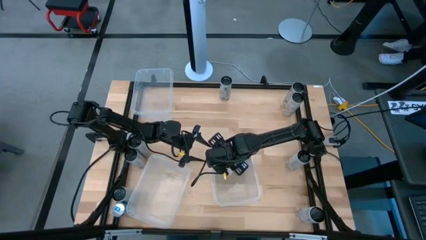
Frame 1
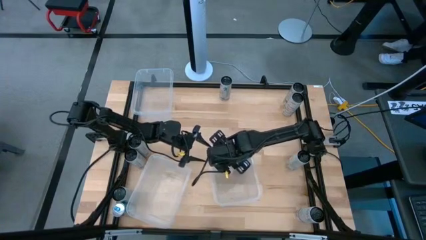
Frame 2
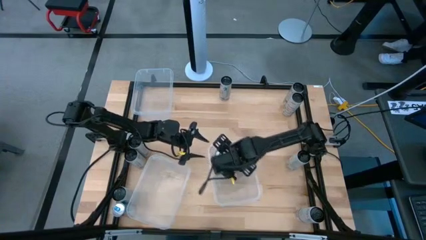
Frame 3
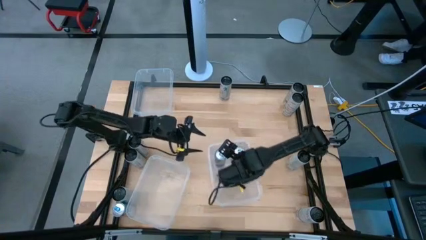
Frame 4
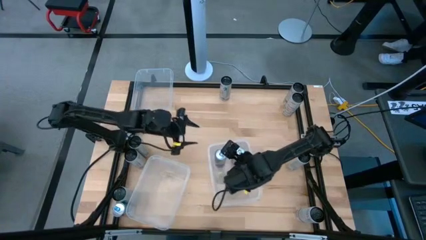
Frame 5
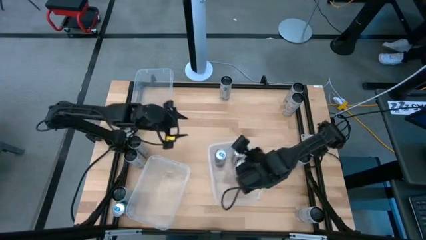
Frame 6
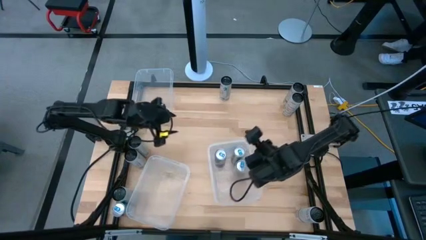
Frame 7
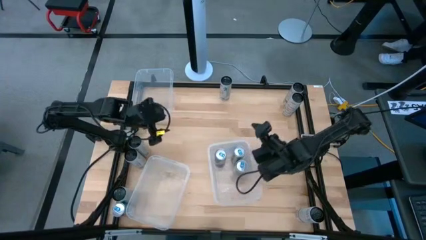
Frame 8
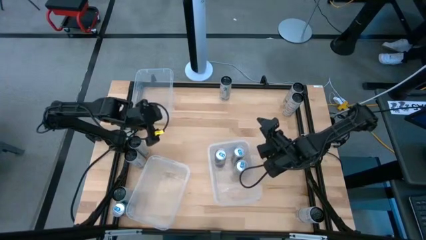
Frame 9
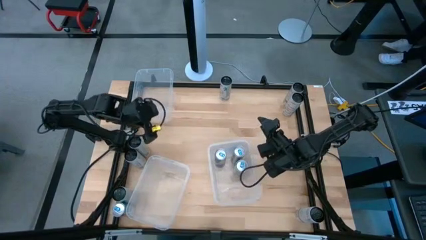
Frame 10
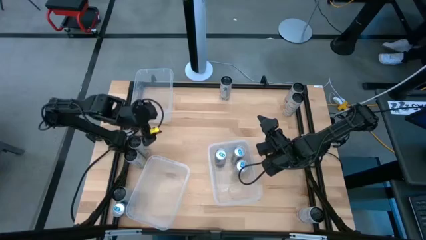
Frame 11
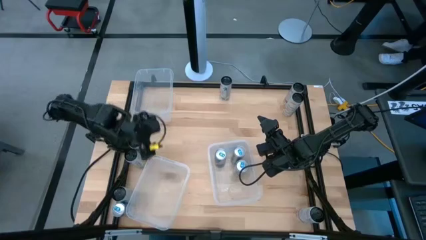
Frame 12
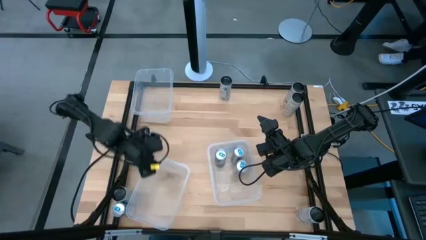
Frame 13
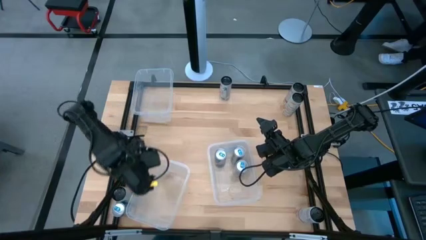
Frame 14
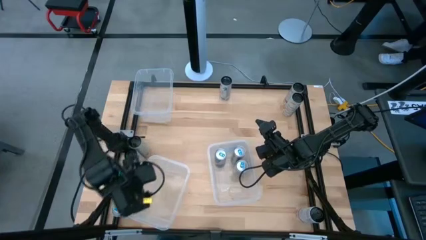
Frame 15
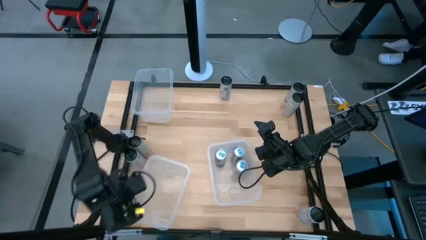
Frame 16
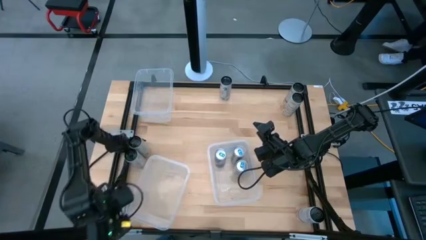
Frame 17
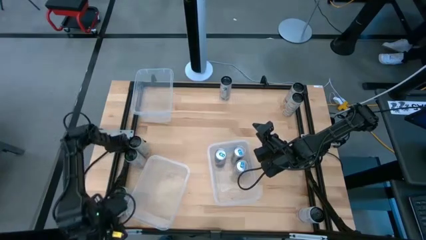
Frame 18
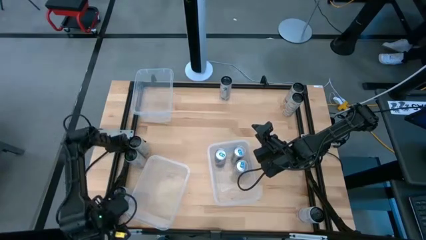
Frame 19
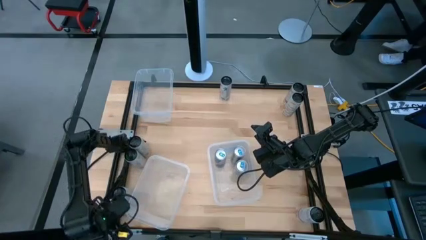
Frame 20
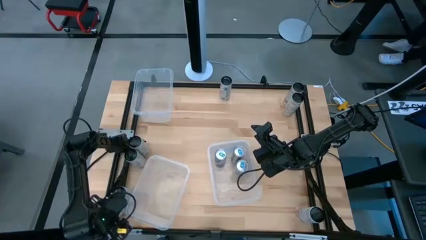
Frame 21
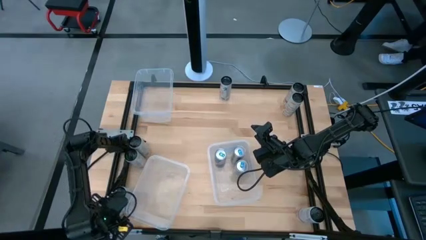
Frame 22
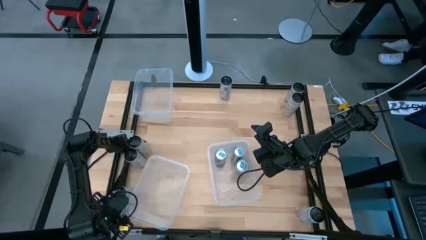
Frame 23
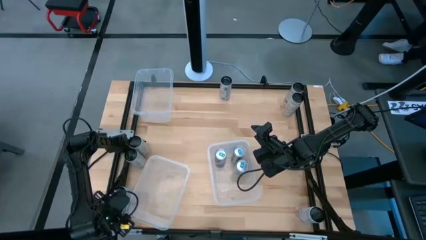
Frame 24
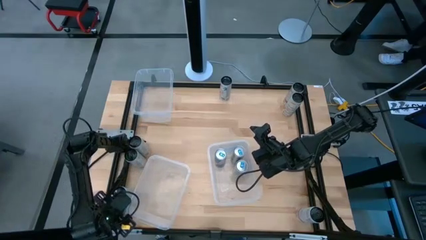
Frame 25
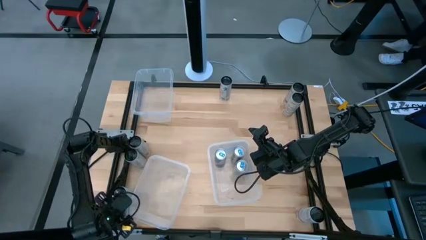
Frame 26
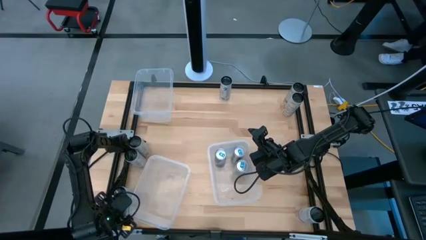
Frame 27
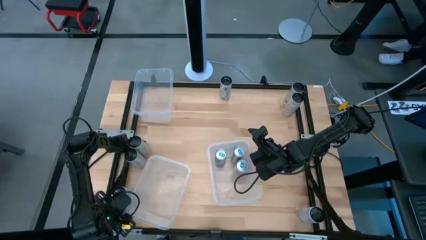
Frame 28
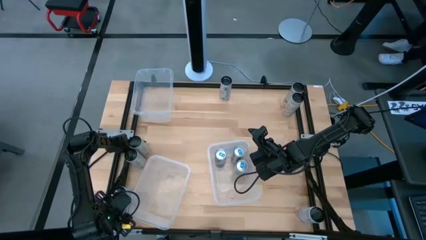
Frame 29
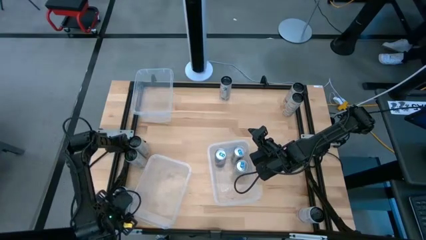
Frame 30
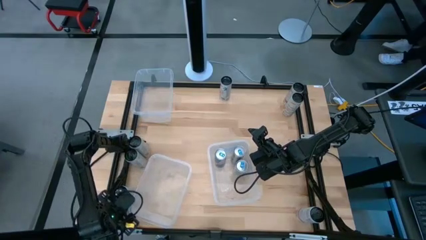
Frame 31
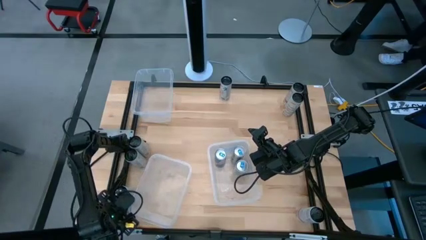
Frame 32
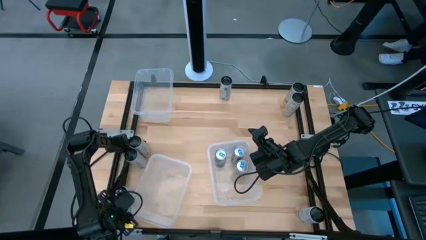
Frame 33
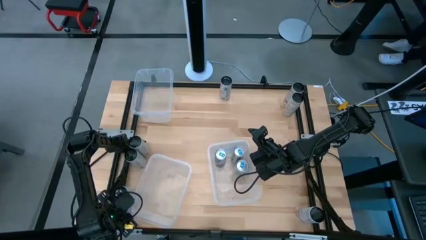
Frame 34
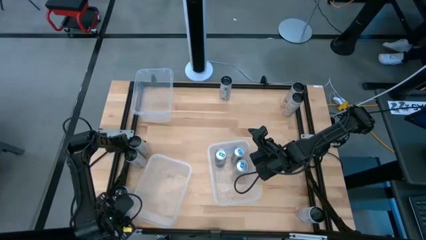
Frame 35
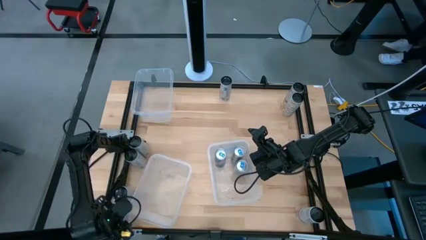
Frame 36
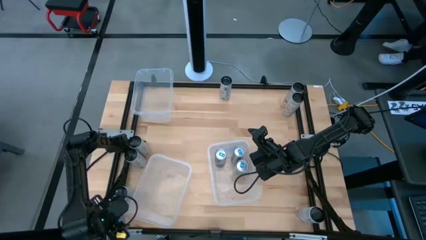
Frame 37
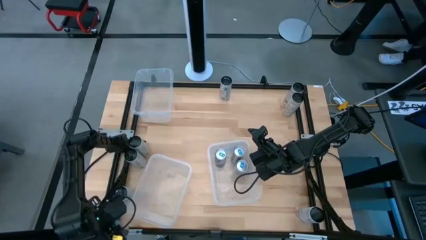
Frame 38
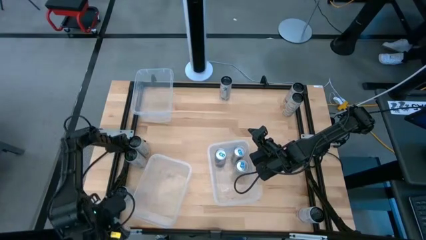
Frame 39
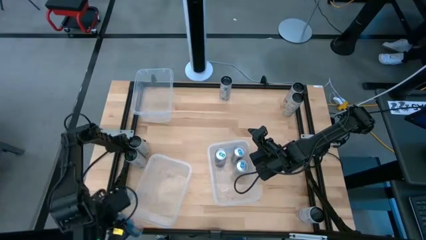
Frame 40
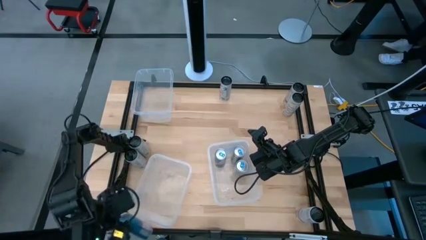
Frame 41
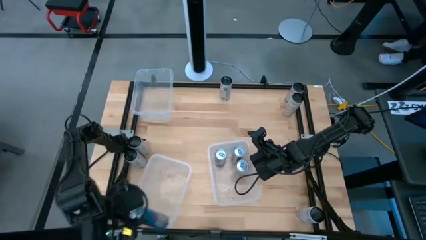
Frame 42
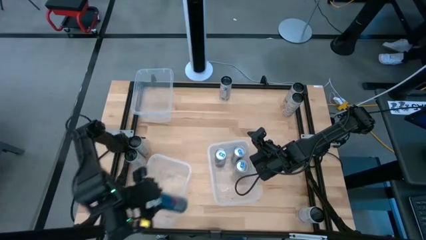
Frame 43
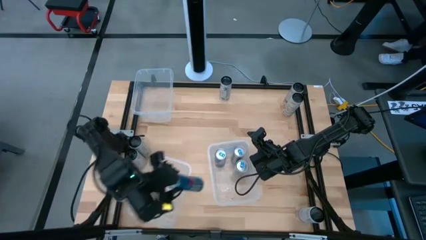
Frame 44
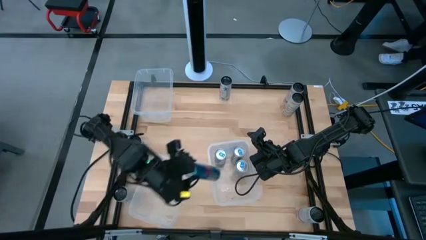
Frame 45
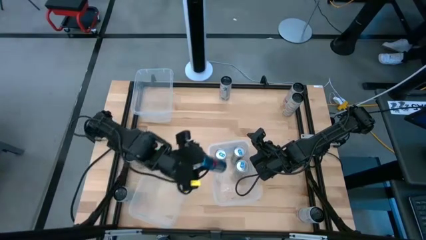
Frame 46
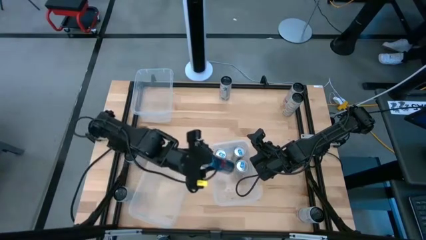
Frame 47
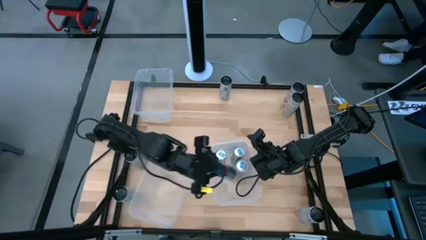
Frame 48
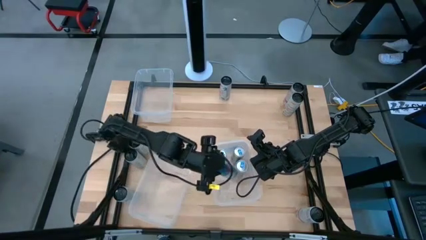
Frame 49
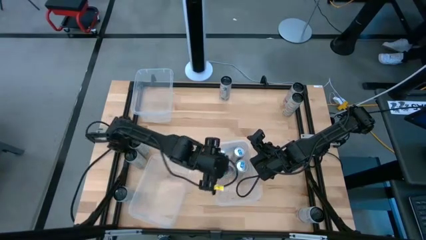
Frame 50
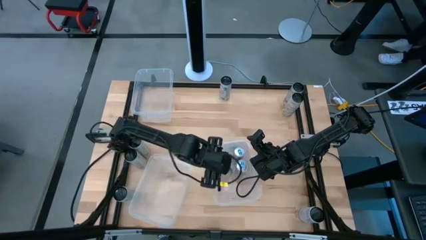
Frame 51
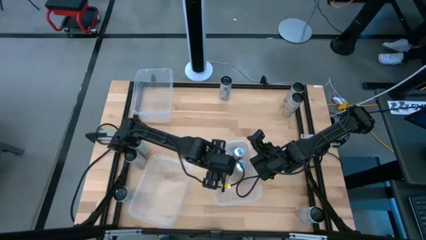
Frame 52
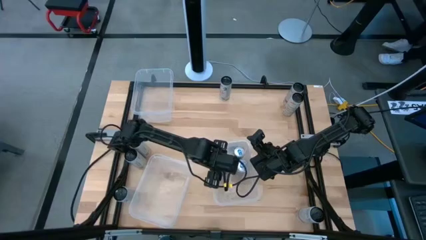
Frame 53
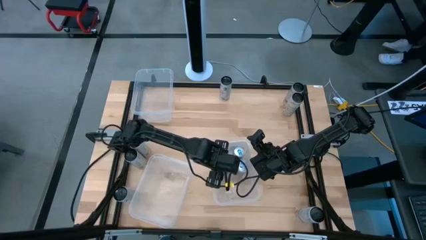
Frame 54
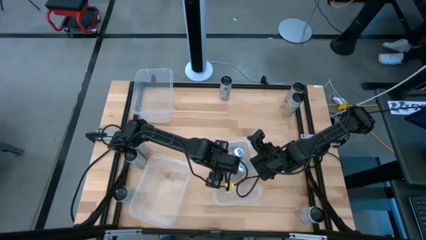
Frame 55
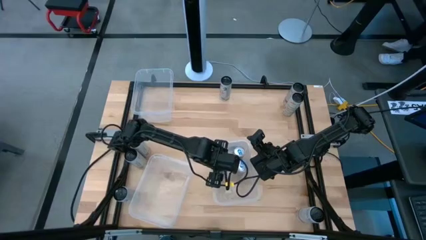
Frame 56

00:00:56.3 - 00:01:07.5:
Task: Sort soda cans
Put the blue soda can into the bottom right transparent bin

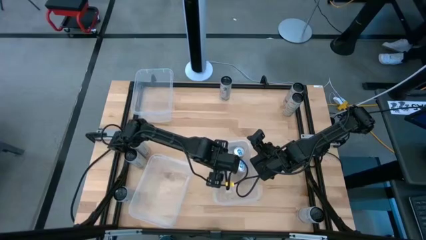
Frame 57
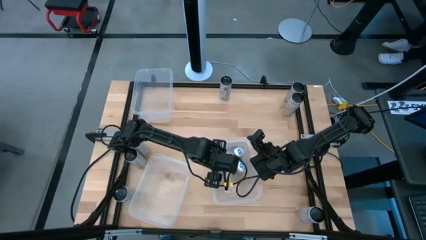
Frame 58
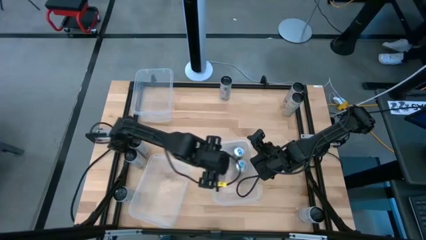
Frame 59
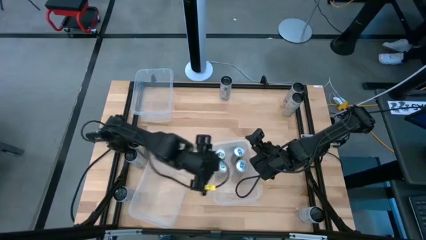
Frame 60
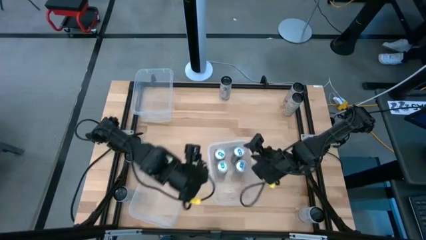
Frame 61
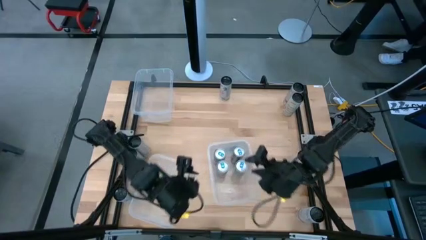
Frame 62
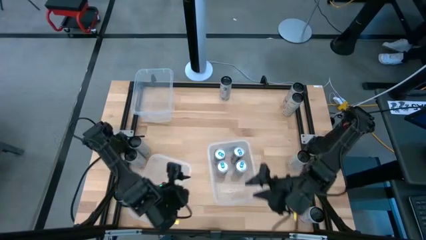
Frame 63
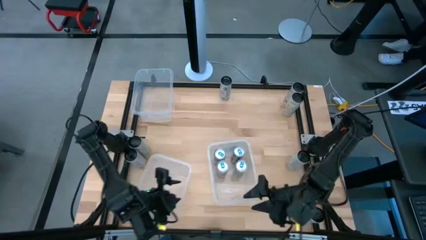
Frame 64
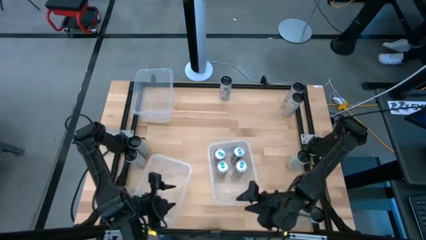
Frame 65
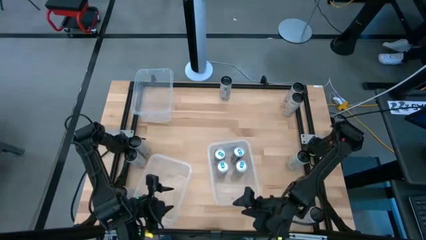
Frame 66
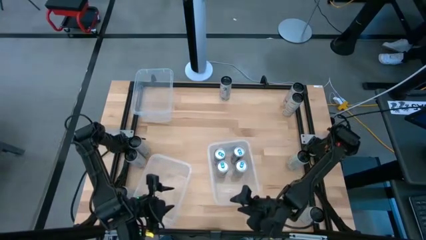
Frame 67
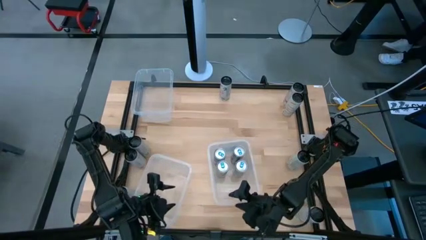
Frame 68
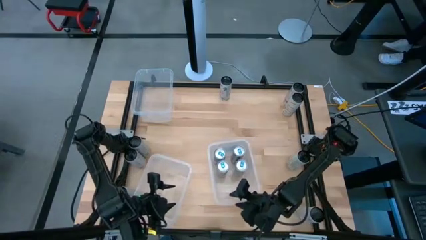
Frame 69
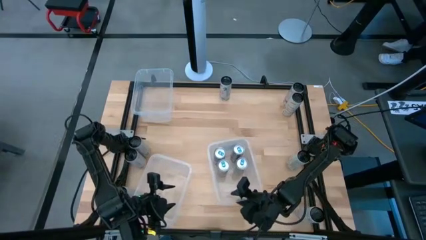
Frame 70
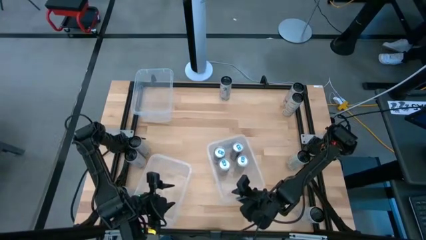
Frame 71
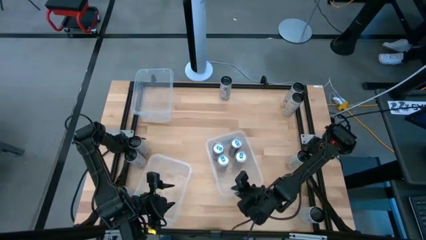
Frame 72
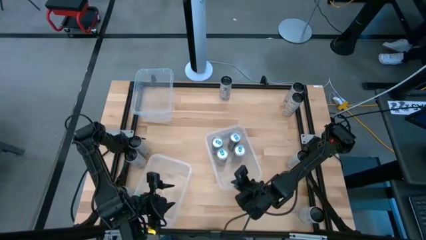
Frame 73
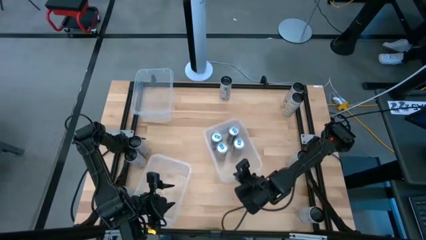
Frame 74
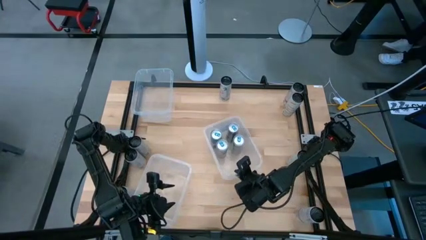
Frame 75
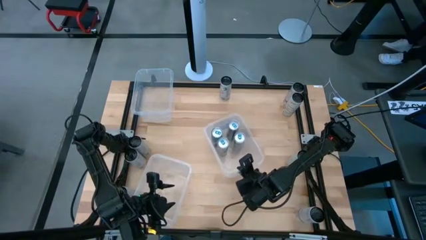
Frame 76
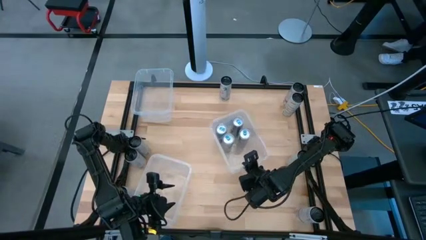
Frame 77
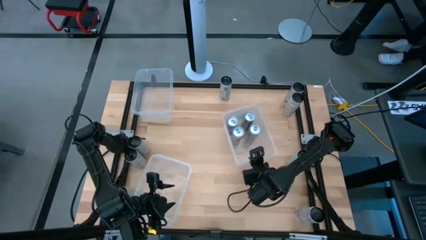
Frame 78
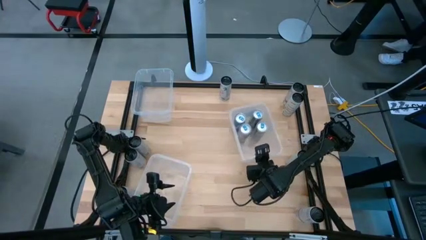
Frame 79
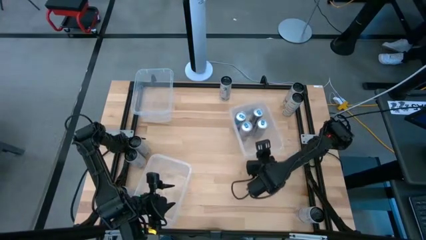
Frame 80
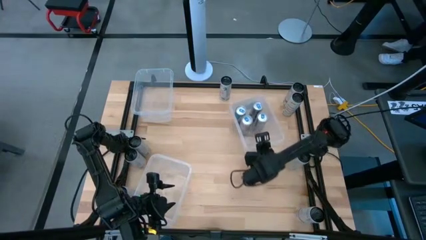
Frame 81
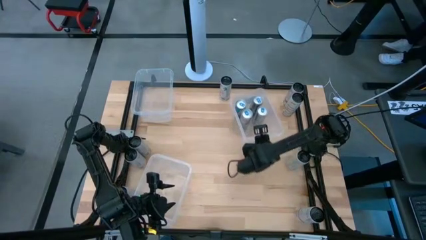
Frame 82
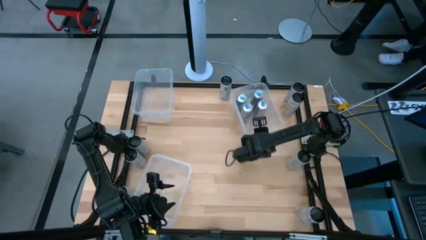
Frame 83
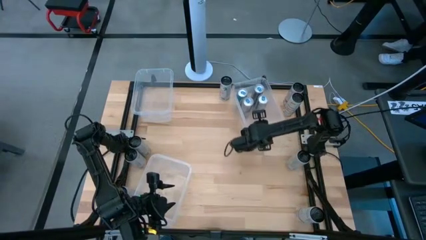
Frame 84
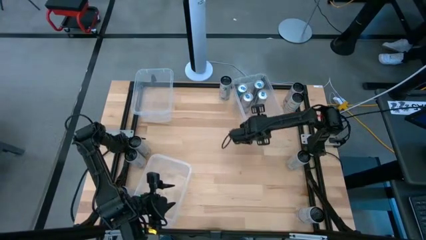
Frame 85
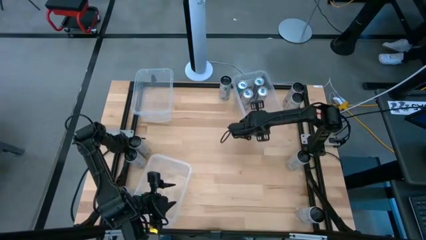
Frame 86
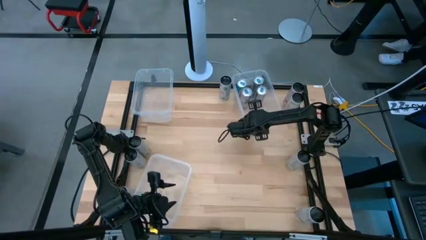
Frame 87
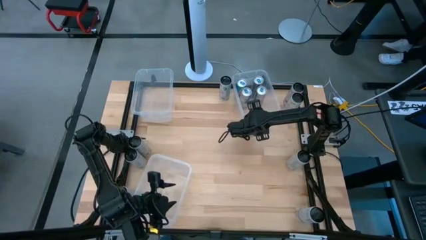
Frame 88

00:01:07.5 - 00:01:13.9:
Move the bottom right transparent bin to the top right of the table
